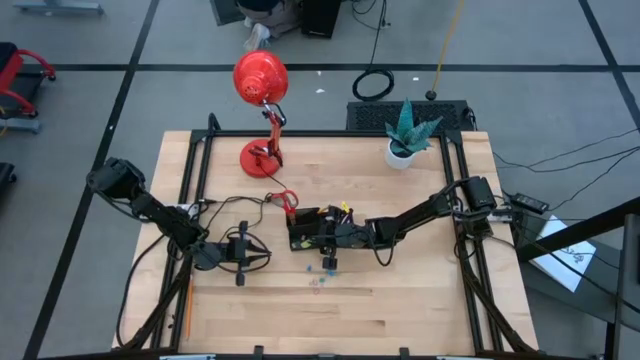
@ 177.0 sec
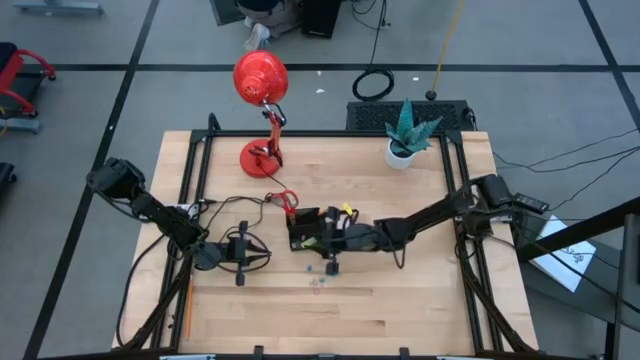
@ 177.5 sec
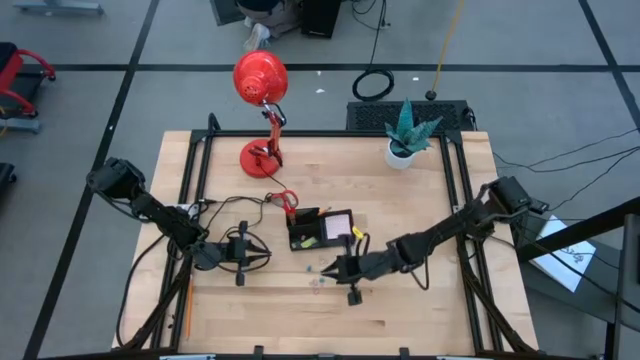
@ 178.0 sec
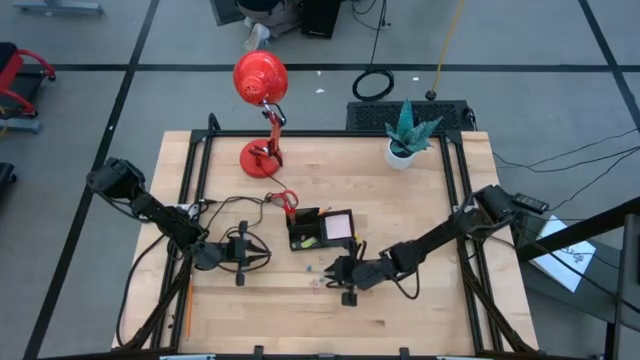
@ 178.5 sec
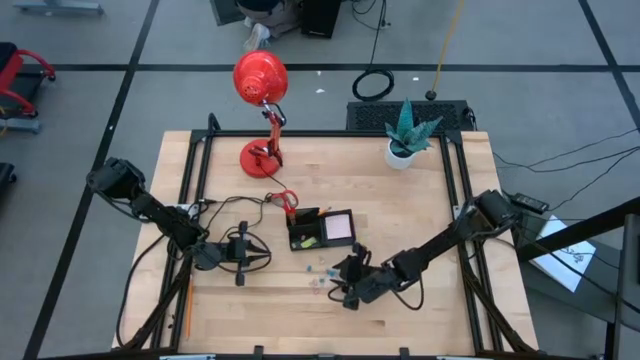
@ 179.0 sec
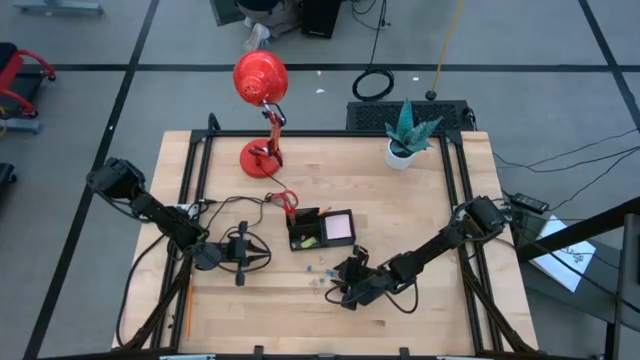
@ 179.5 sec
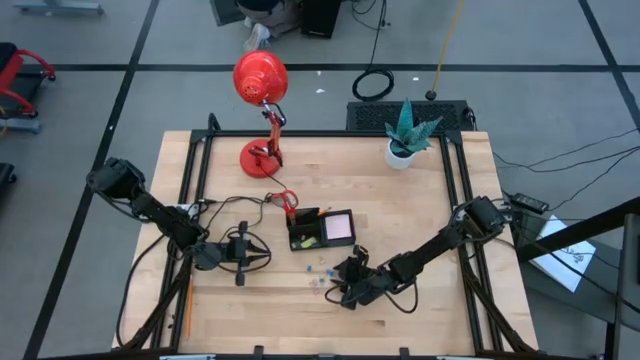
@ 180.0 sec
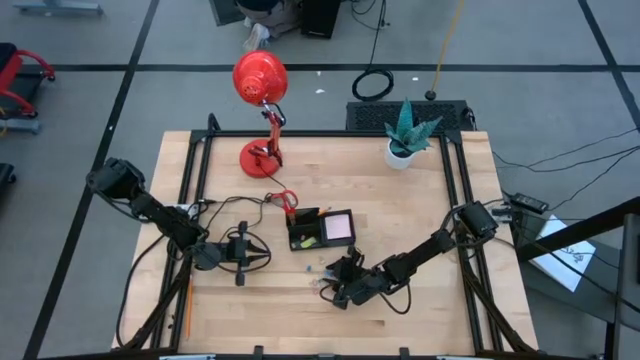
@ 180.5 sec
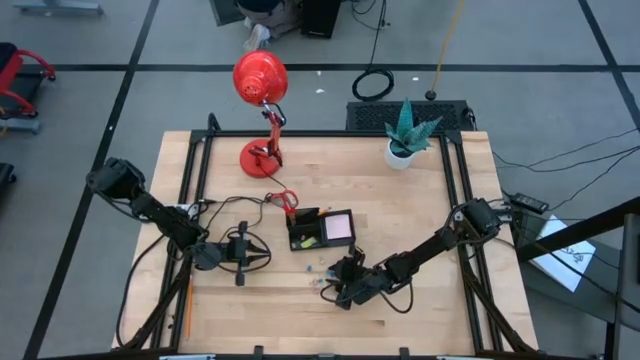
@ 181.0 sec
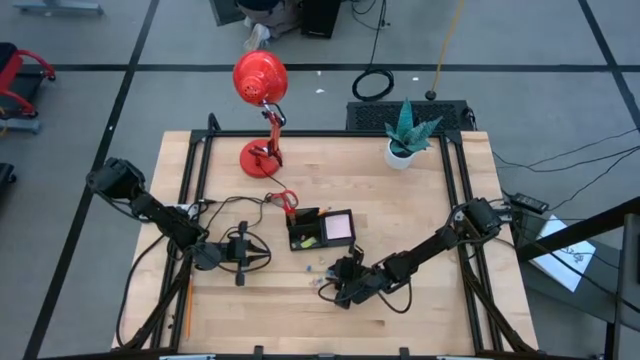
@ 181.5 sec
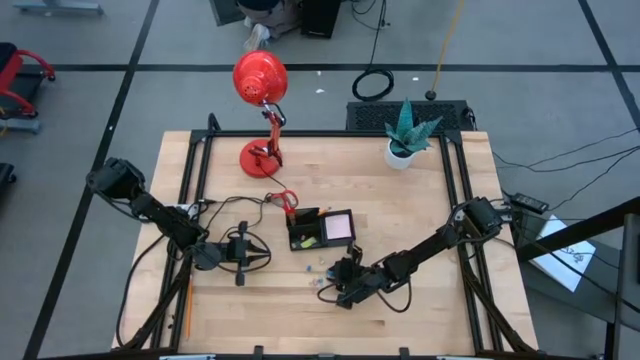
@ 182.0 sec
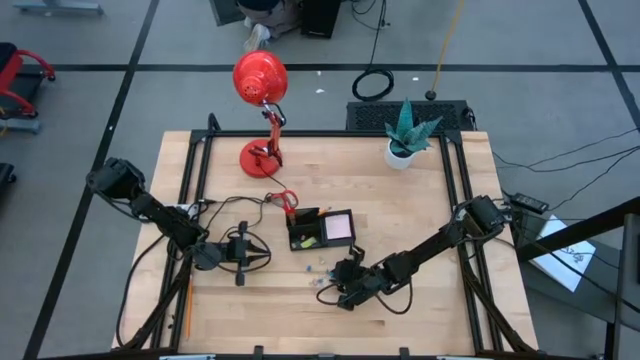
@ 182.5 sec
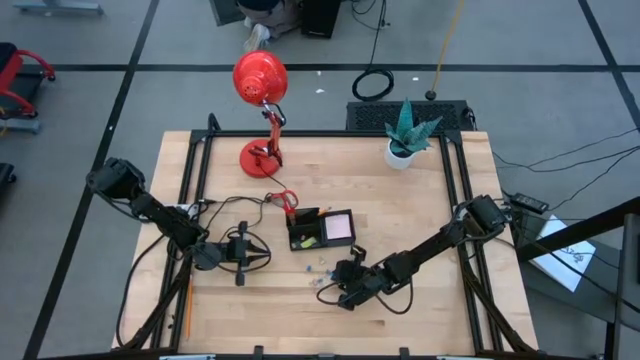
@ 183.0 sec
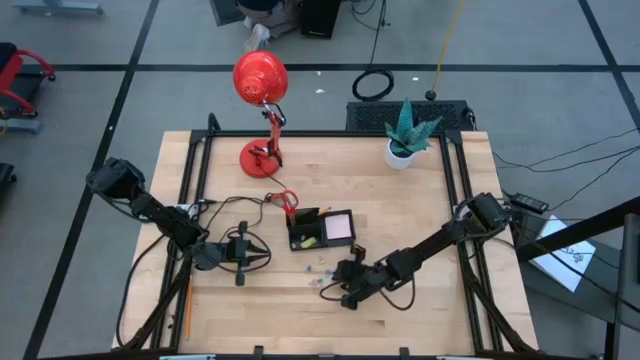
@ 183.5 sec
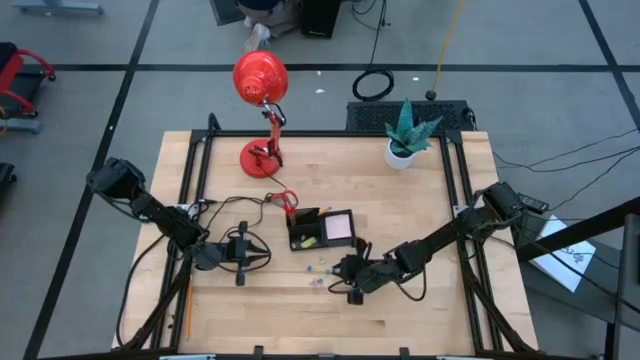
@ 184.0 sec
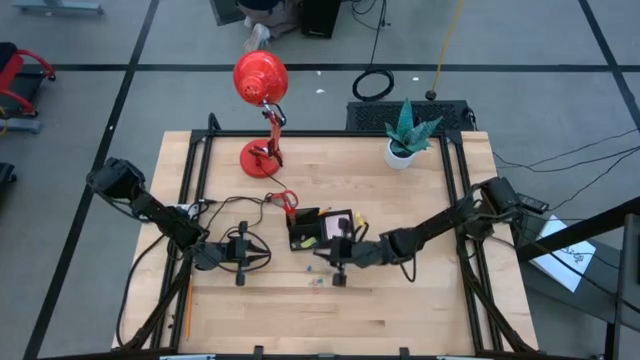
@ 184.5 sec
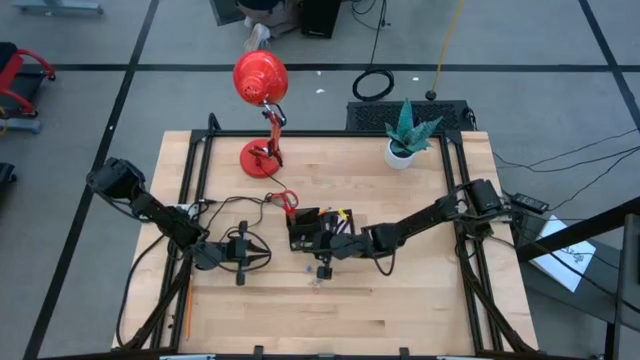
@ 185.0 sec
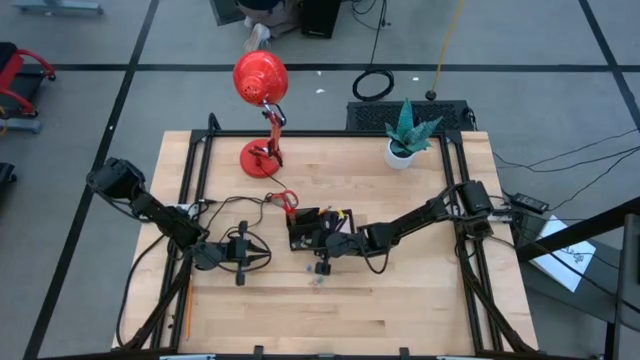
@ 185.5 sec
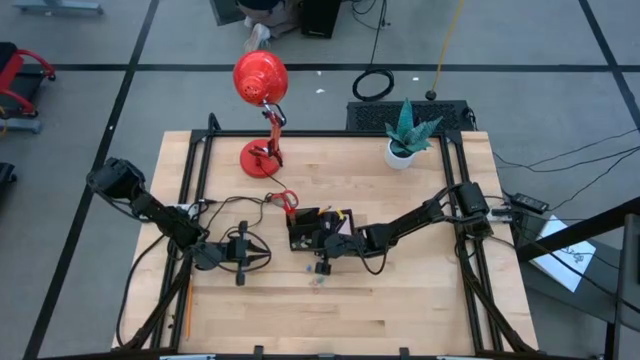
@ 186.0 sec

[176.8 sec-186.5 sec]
Task: Pick and place office supplies into organizer
Put the blue binder clip into the black desk organizer

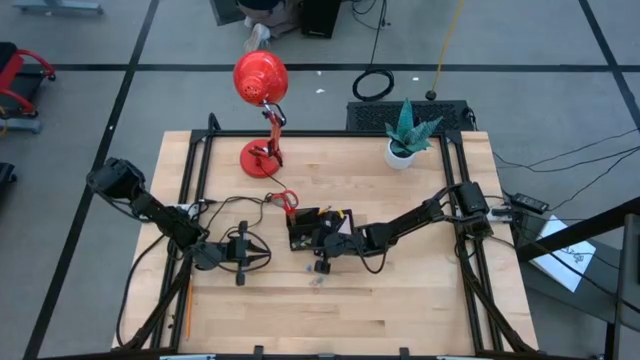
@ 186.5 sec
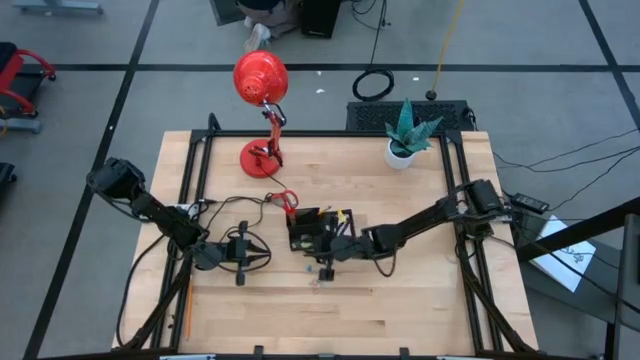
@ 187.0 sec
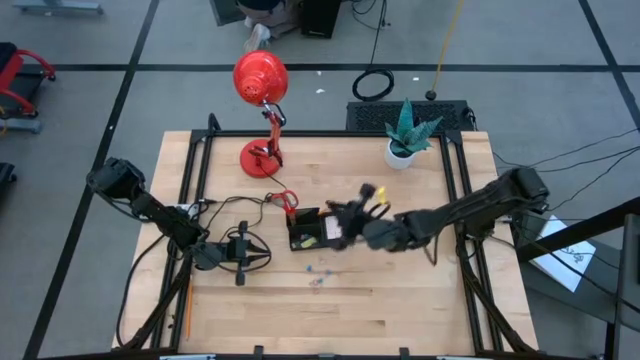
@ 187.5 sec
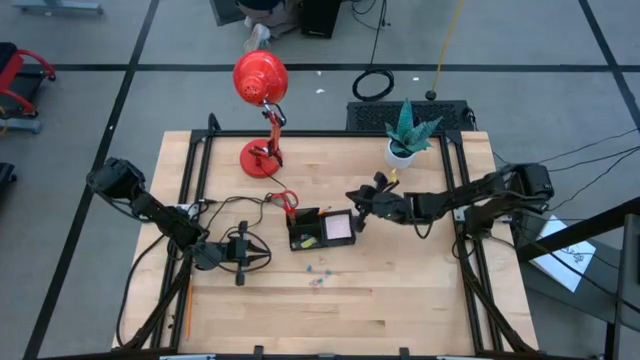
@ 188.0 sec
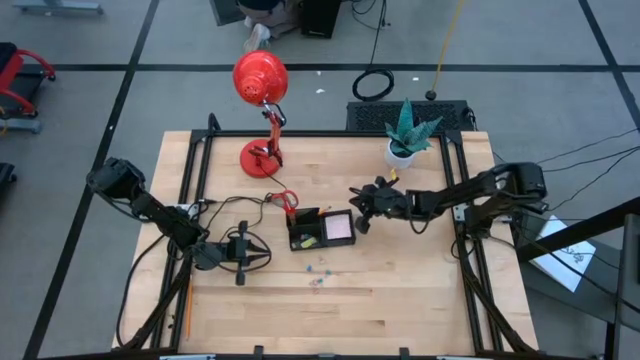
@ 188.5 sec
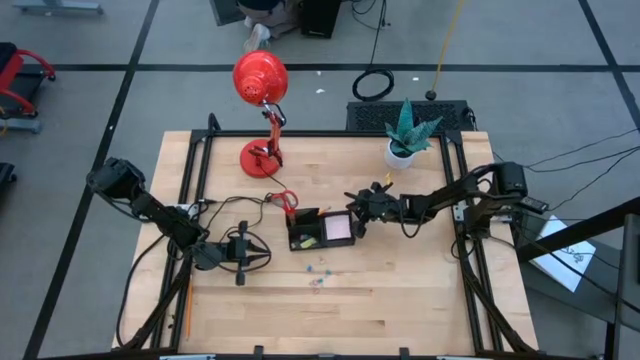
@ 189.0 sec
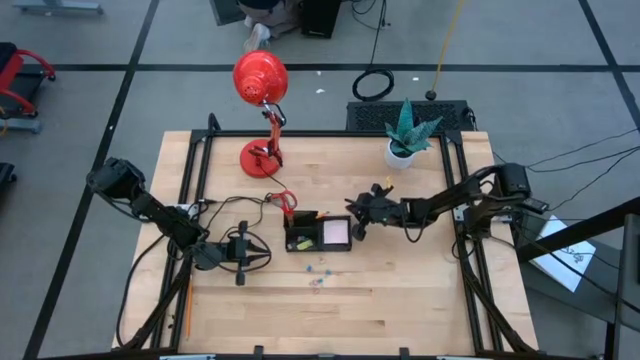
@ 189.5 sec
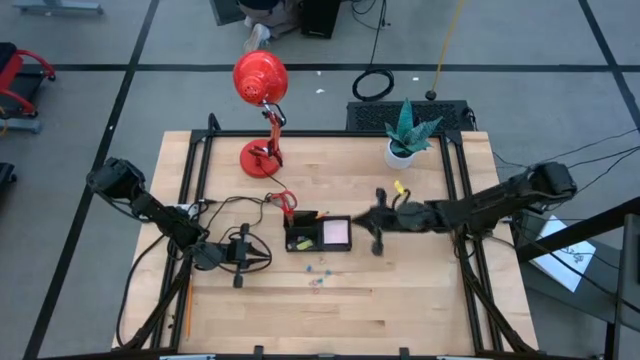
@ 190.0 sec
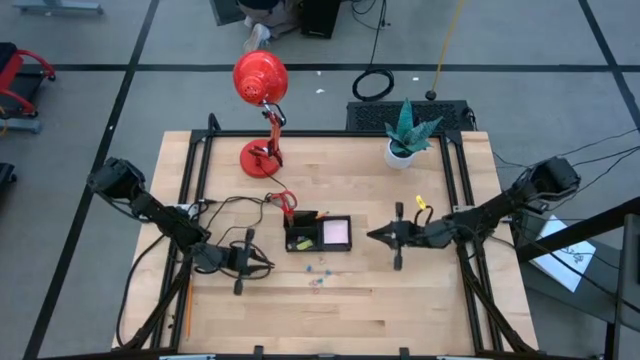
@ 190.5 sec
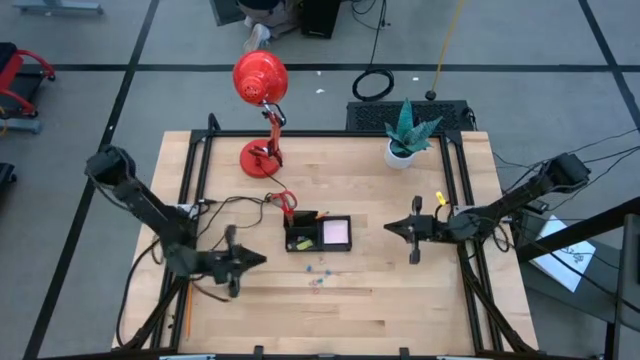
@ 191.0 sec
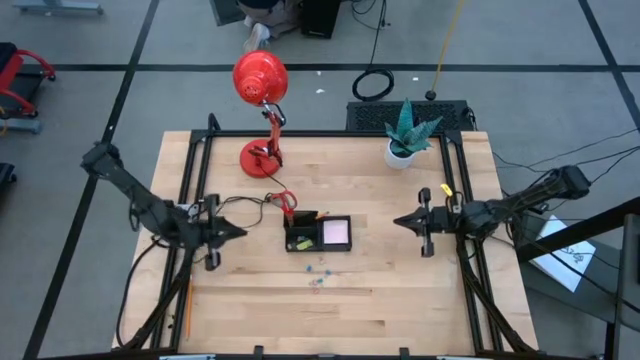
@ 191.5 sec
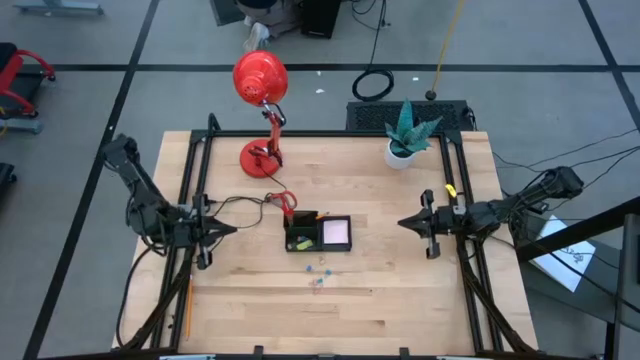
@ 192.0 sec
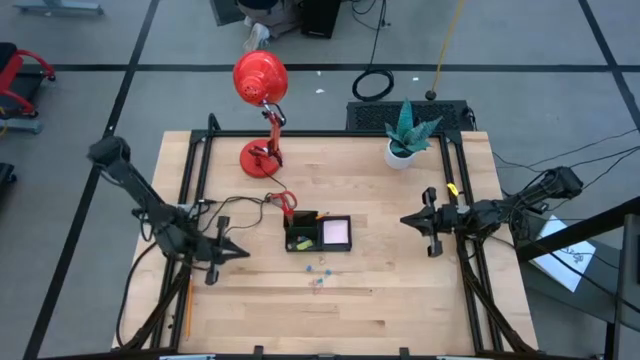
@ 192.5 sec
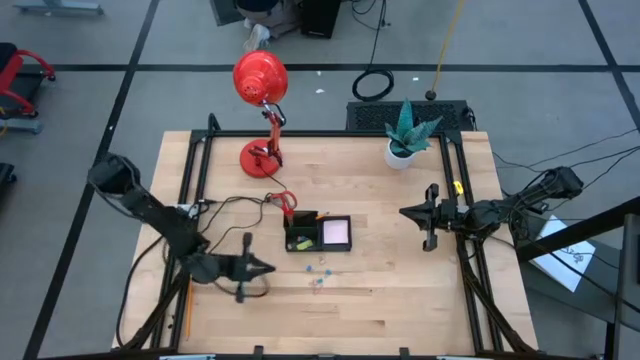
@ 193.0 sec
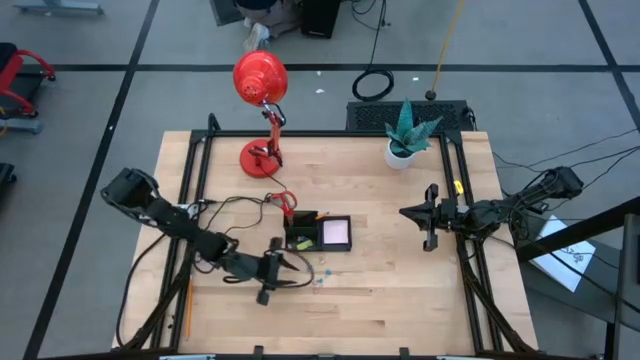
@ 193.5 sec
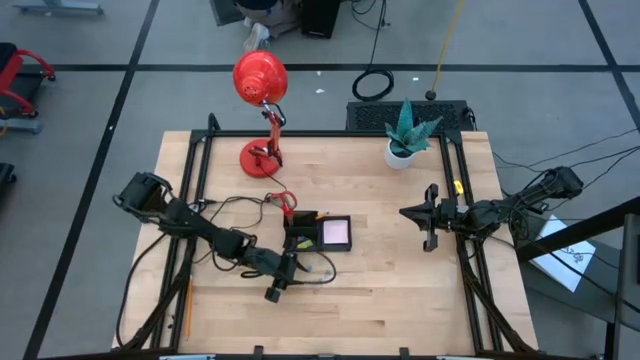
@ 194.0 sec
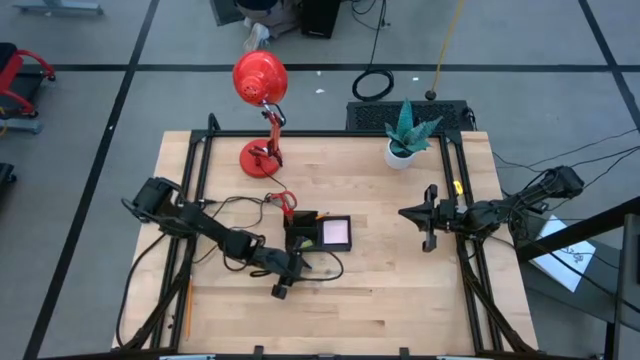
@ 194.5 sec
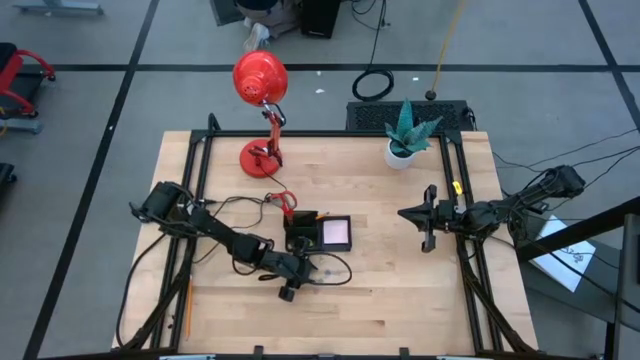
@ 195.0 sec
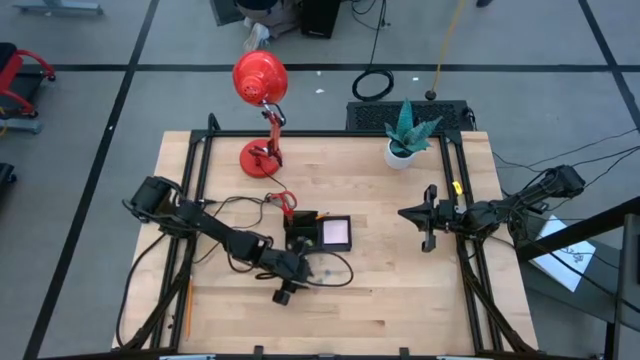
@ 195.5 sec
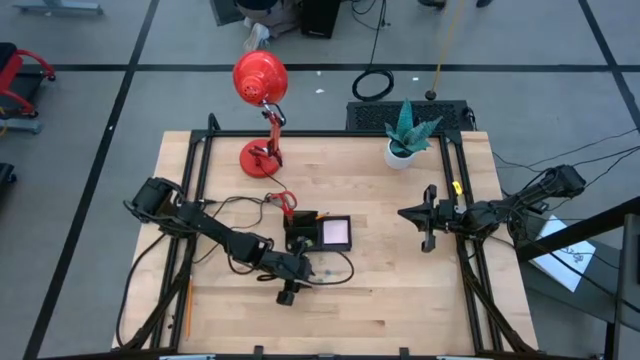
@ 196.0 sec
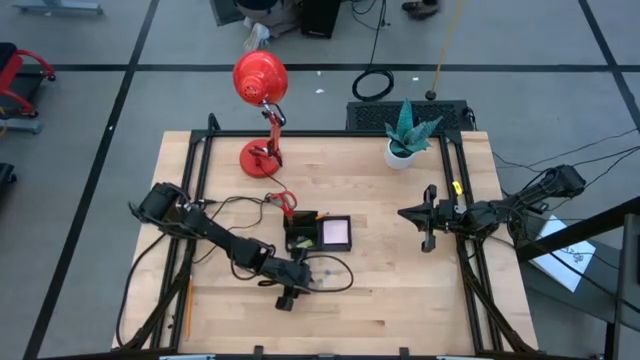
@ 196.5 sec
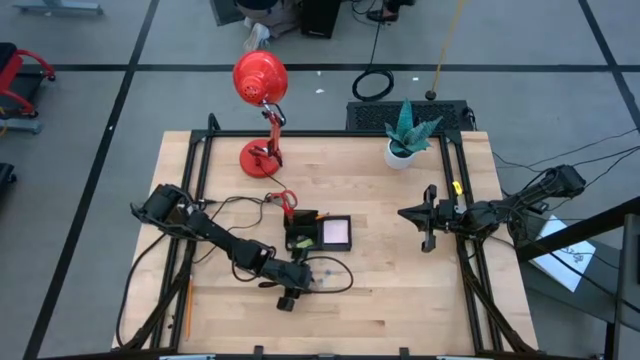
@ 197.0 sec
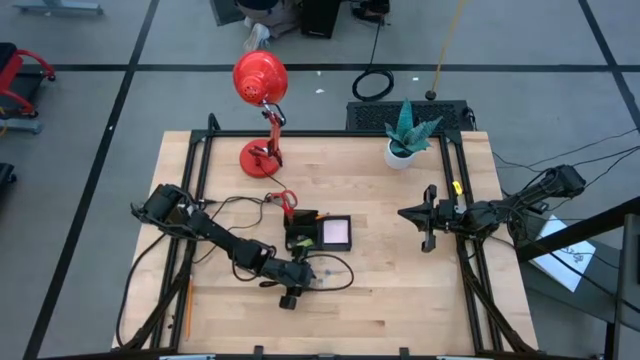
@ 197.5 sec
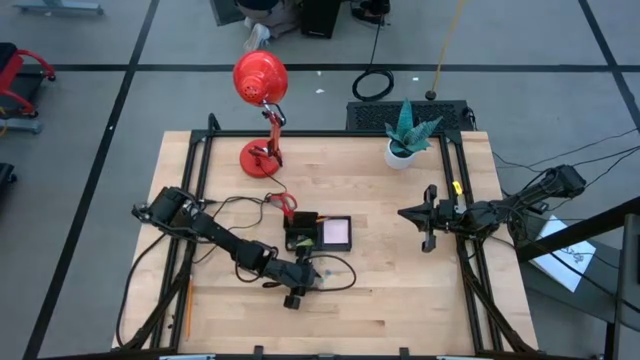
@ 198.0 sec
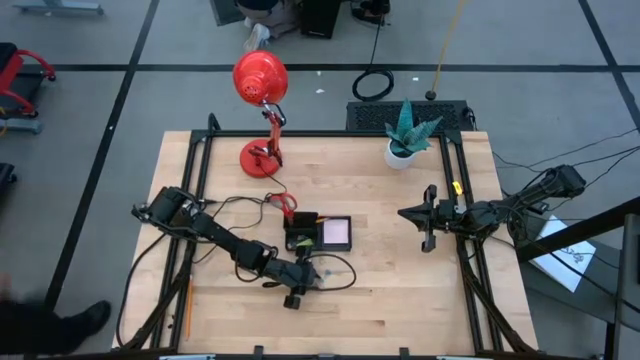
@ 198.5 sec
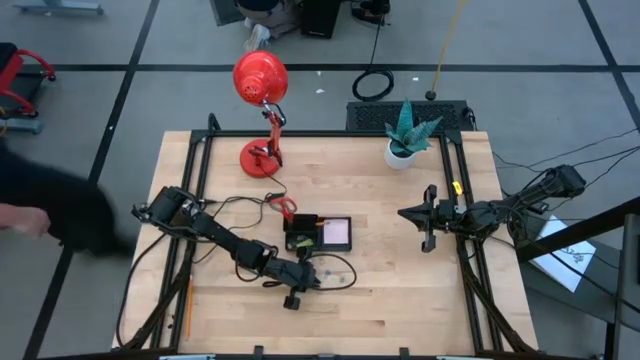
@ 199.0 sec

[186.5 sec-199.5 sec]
Put the pink binder clip into the black desk organizer
